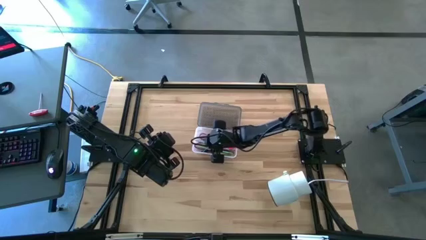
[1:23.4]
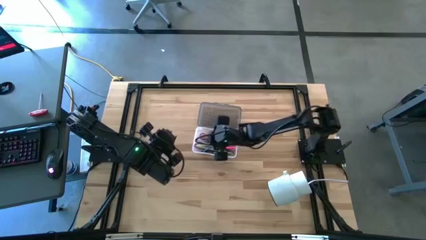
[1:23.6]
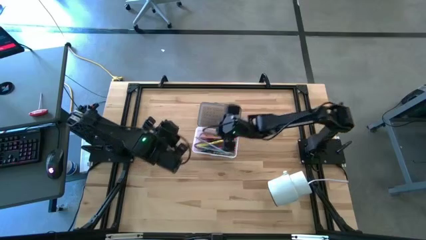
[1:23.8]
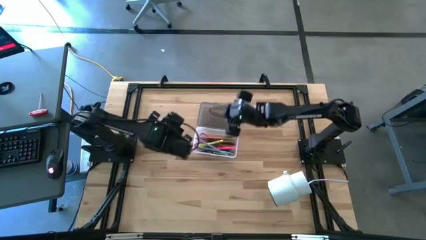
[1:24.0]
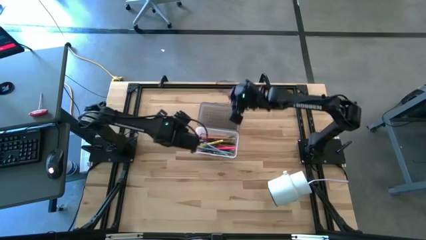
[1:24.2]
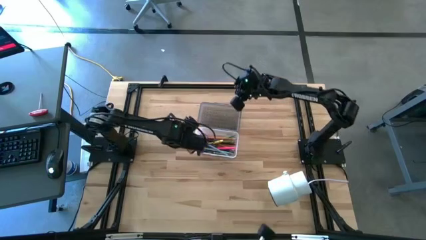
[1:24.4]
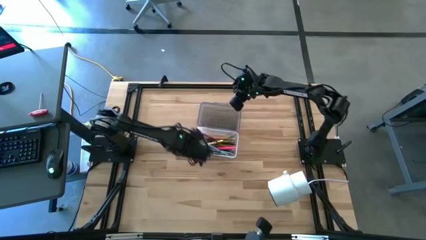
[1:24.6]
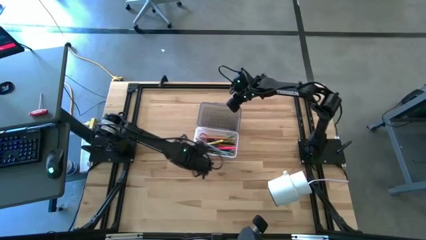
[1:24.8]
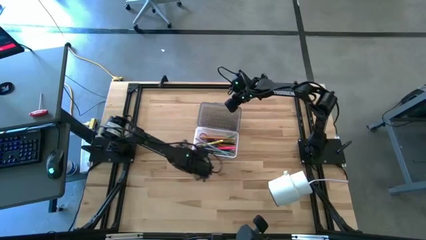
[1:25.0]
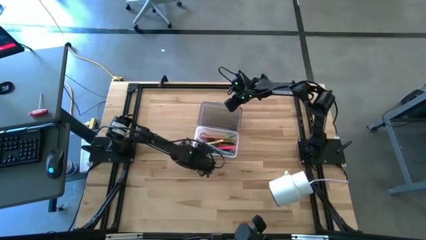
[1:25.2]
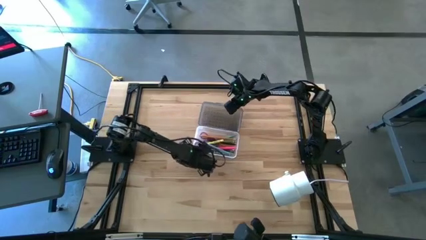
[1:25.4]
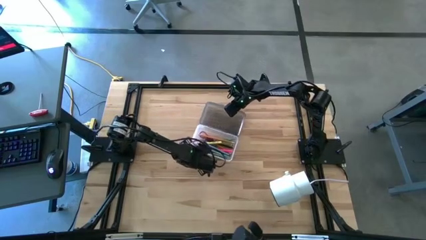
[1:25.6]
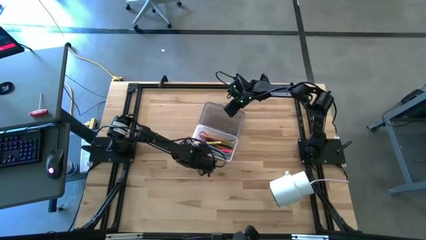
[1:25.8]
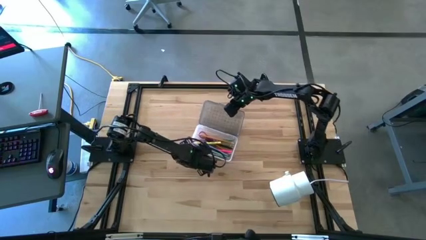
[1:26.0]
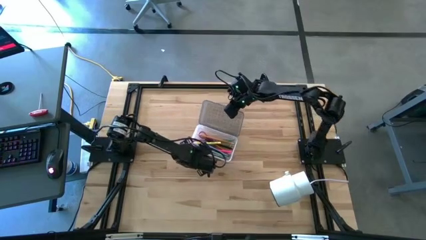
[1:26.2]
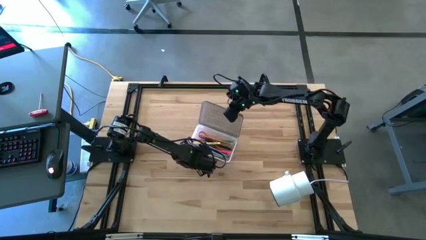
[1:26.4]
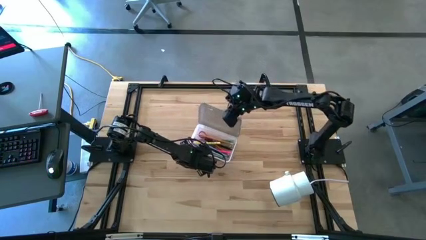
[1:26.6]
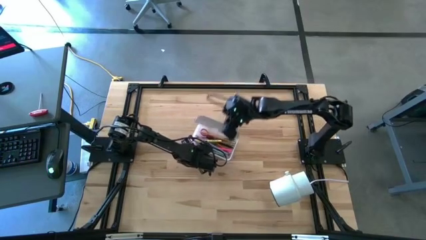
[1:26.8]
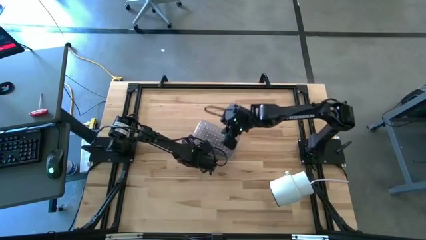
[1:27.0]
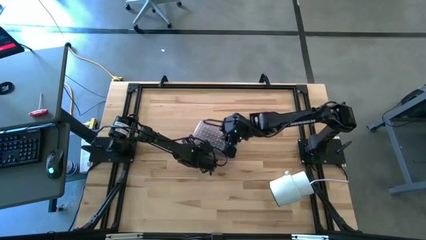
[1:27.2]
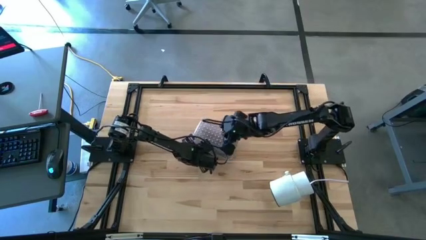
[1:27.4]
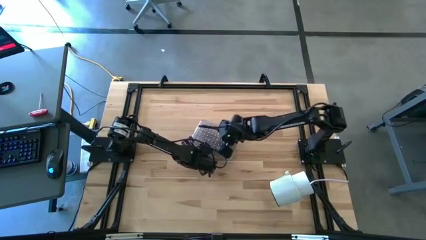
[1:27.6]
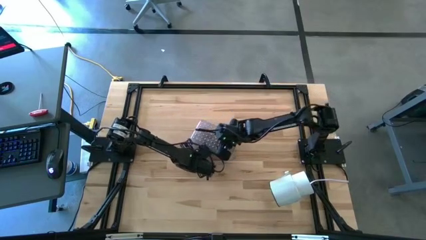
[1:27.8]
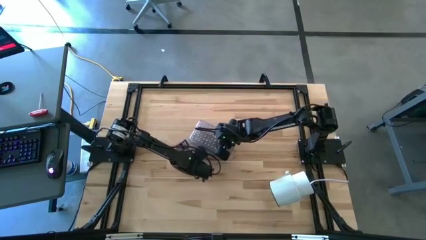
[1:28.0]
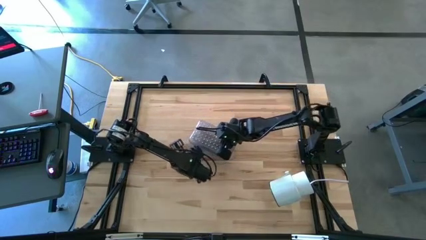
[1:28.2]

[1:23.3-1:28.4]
Task: Pick & place school supplies into a supply box
Close the lid of the black supply box

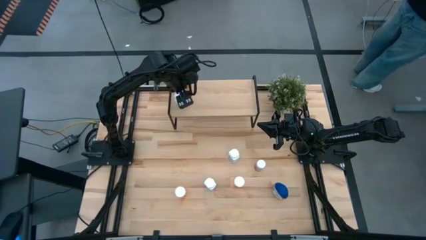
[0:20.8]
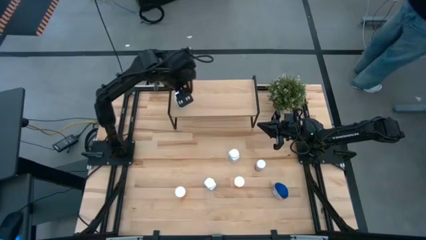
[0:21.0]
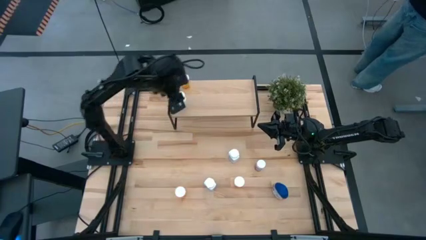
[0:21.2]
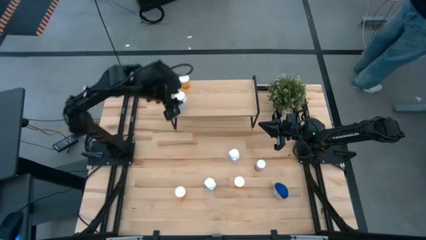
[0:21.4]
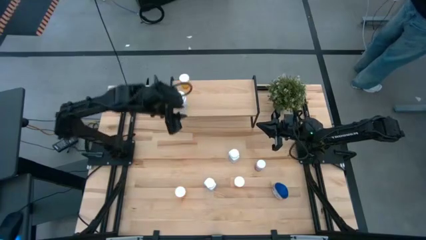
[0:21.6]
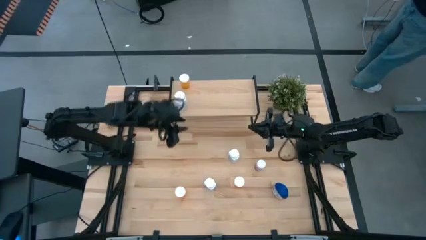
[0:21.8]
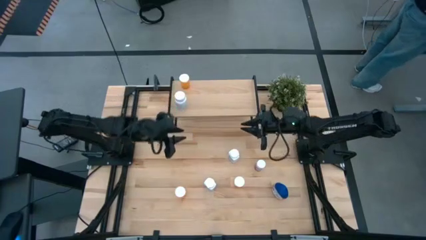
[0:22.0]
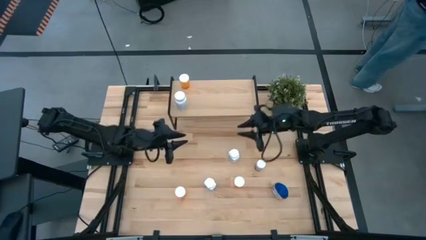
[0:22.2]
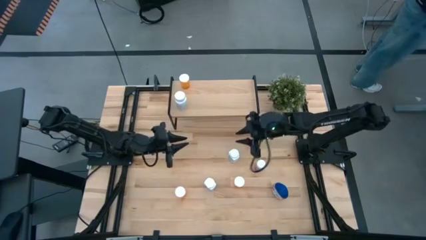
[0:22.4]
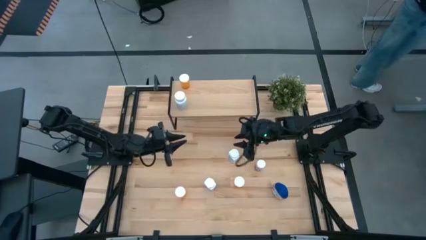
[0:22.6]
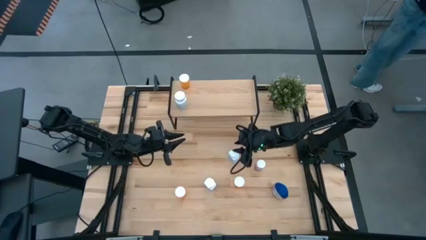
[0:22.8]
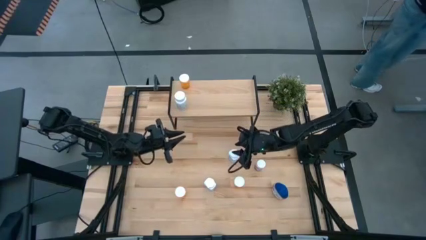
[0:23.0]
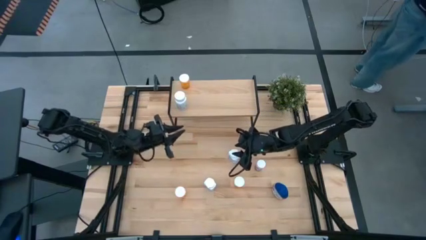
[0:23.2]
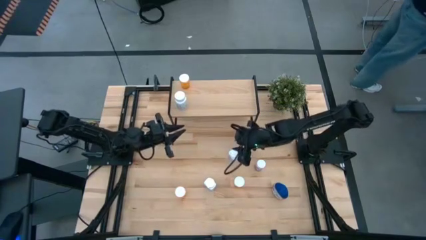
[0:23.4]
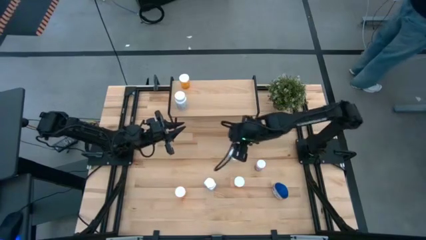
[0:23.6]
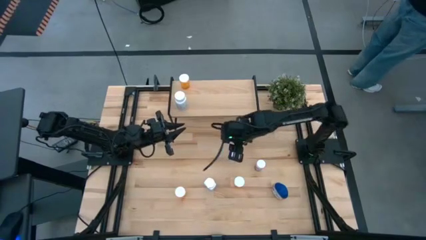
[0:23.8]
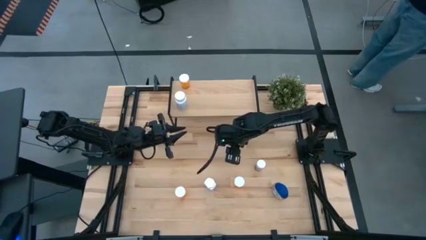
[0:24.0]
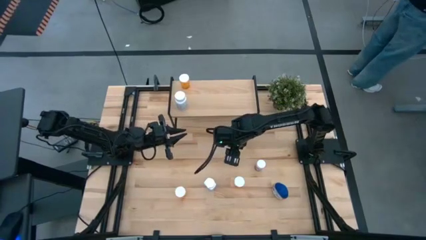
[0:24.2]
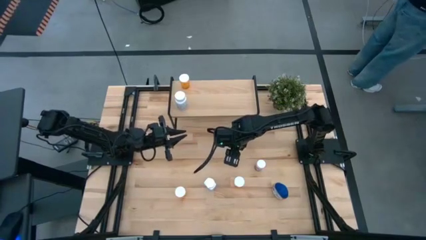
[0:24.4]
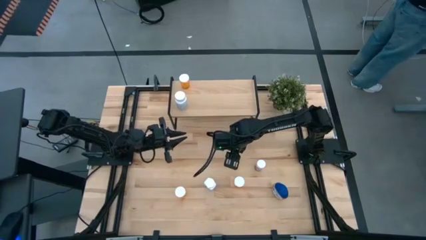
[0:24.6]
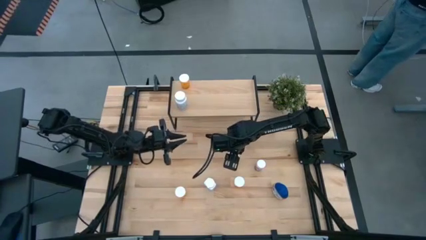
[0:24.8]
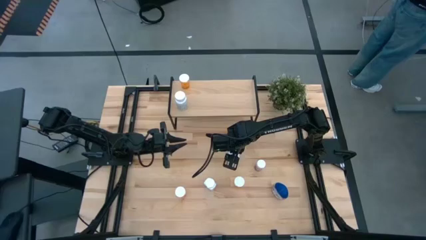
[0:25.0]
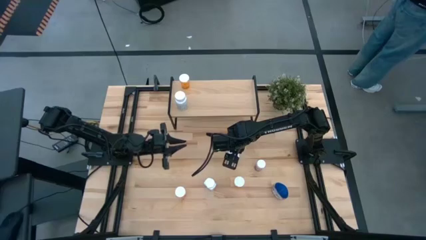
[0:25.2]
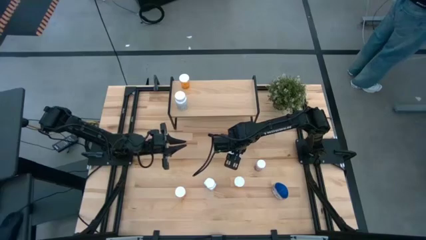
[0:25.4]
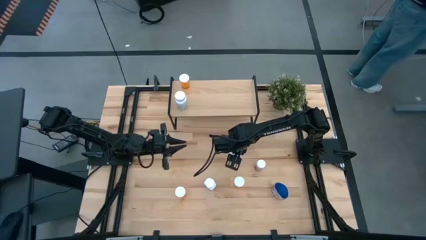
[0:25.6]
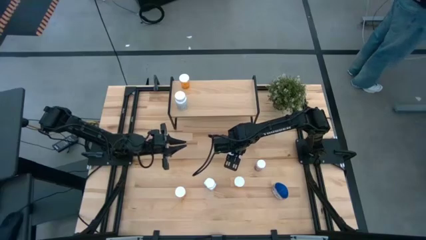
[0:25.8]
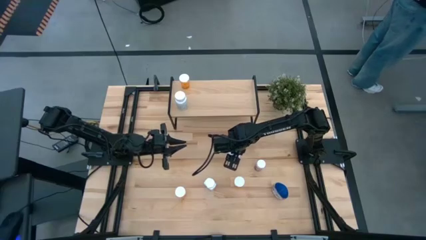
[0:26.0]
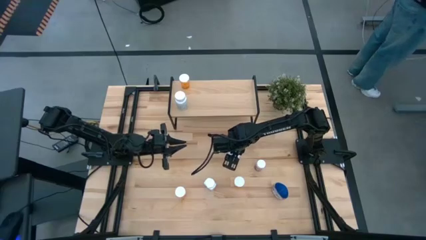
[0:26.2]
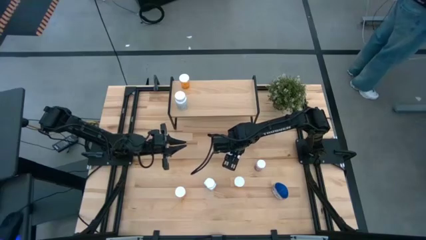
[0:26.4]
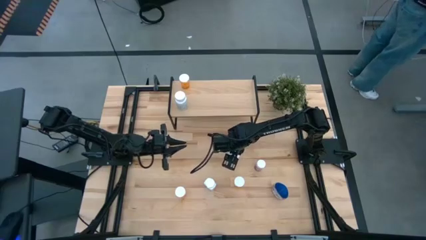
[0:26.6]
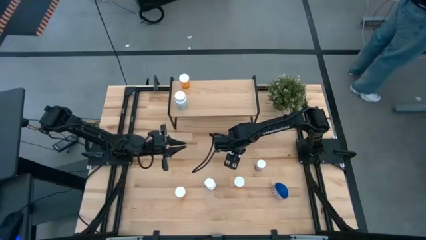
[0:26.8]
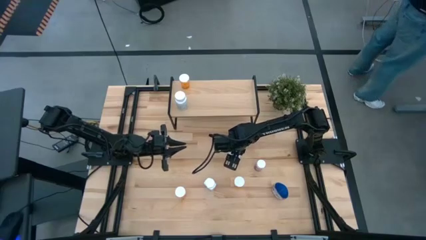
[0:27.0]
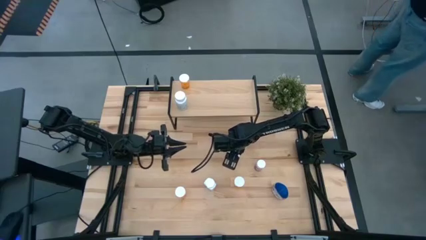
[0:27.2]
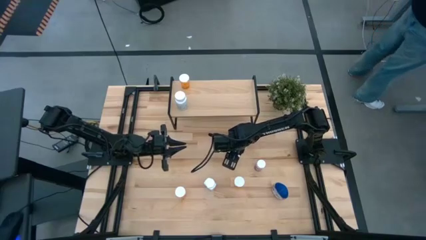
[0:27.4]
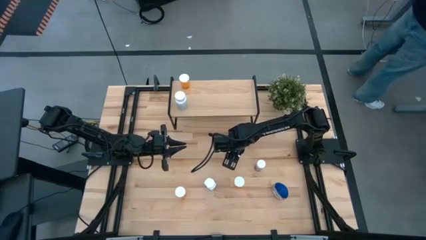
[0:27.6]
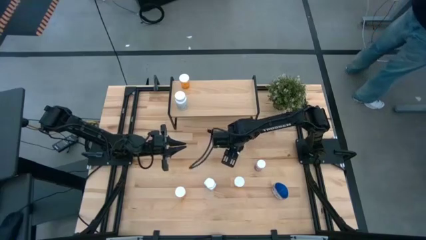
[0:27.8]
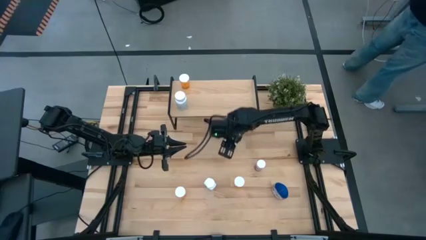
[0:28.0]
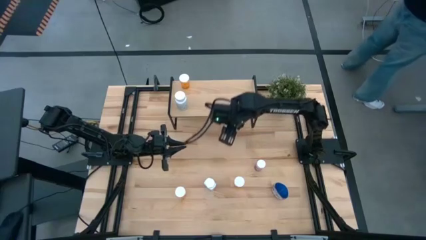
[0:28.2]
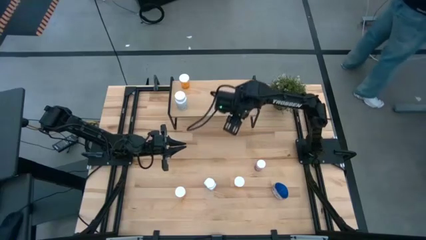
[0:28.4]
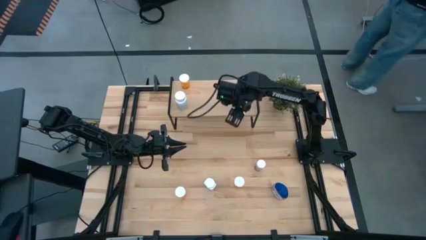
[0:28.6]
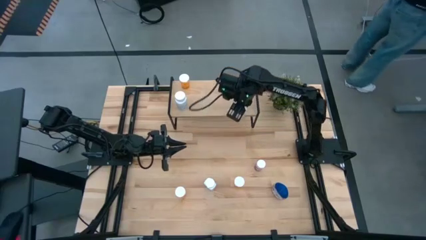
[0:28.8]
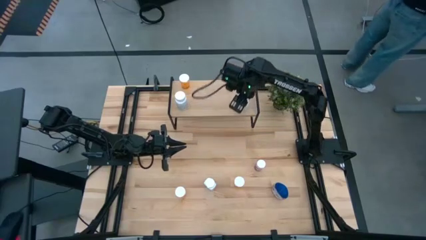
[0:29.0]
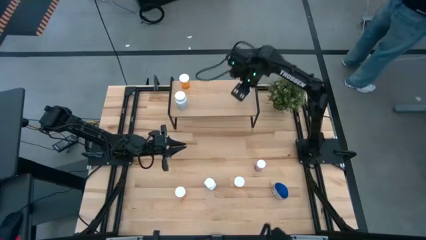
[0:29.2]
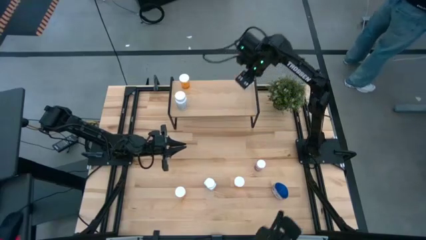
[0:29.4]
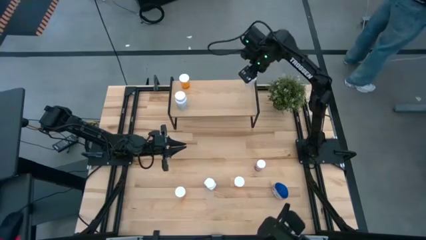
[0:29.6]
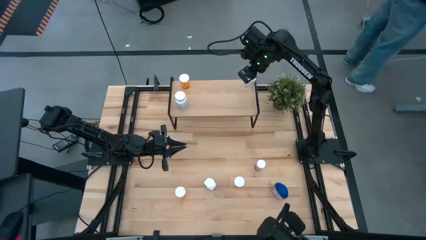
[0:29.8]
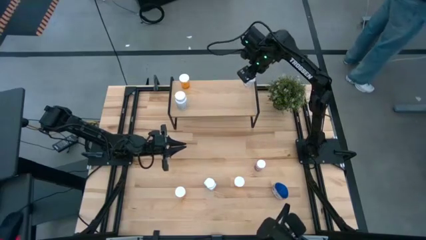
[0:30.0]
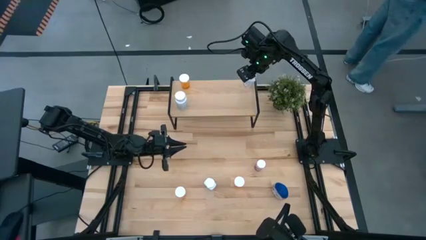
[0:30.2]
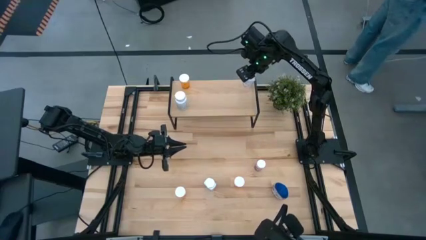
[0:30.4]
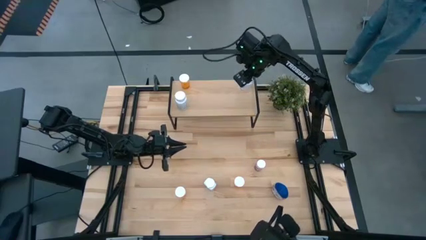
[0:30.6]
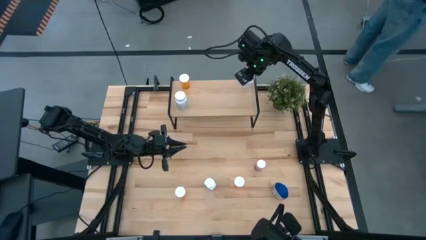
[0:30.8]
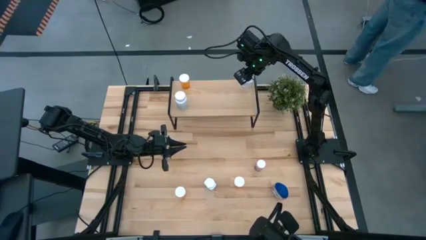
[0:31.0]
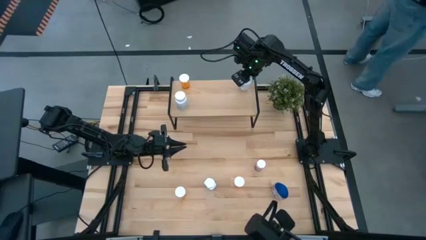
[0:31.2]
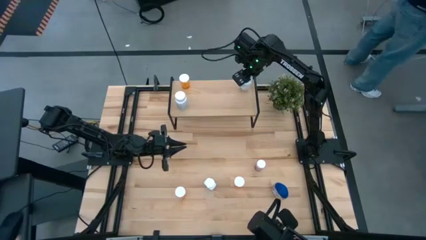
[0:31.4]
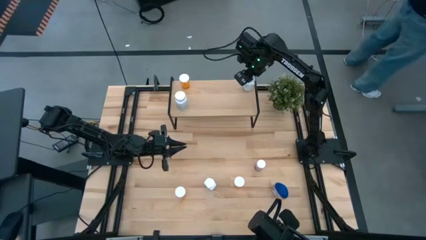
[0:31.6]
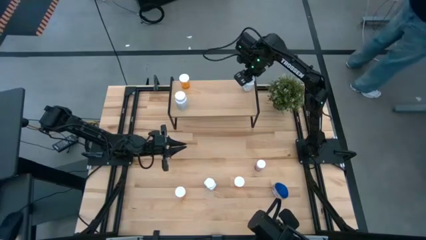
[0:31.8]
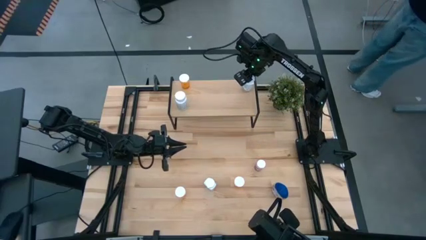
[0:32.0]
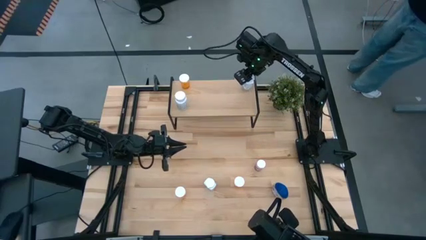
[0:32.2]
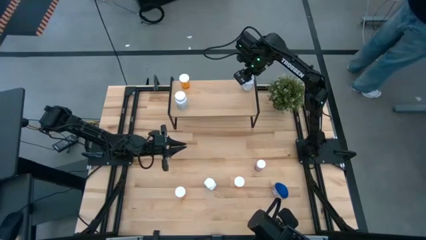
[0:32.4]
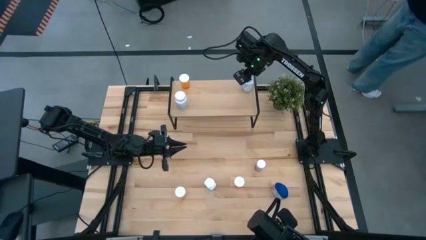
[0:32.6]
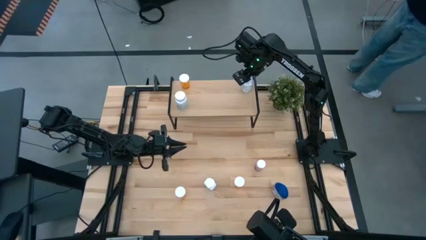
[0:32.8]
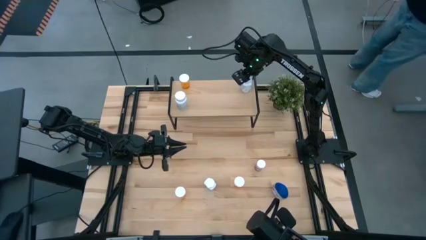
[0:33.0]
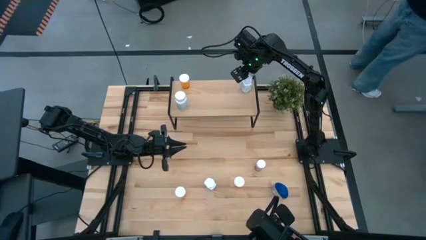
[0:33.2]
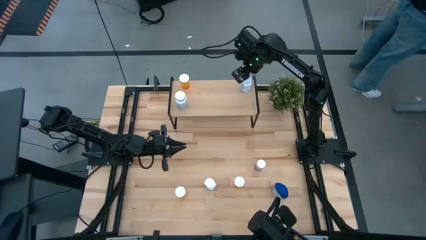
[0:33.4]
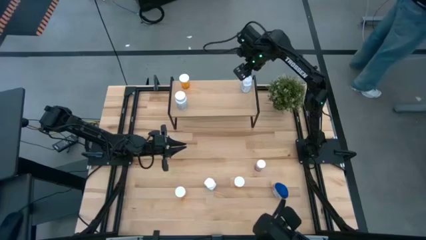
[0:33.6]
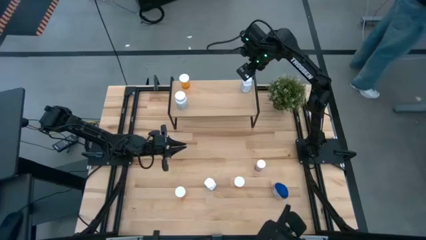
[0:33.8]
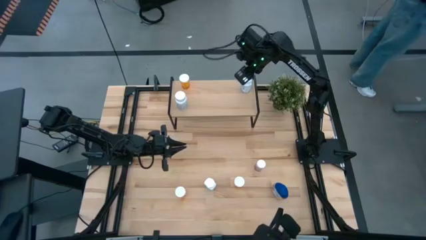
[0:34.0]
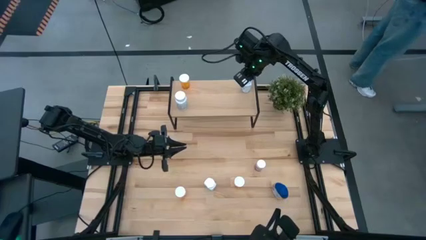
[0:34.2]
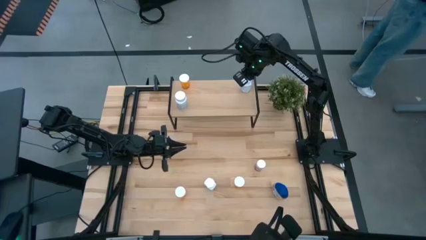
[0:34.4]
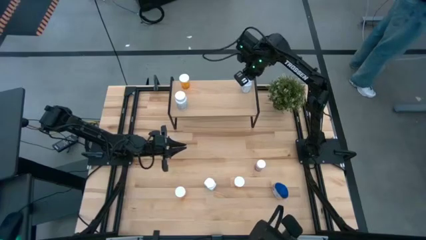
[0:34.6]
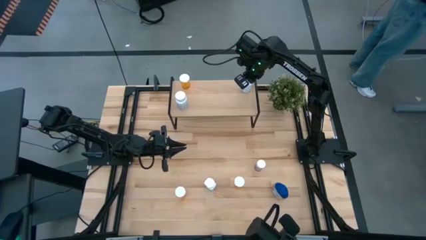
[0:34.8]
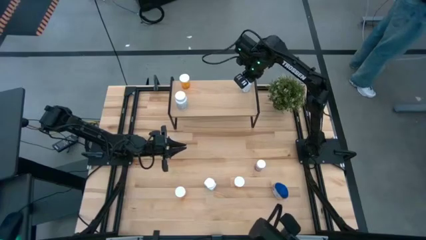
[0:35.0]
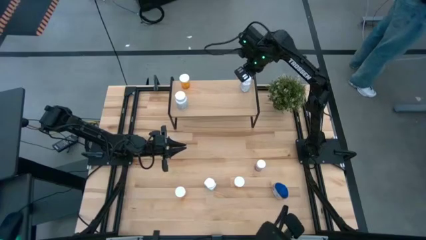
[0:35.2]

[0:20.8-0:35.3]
Task: Pick and place medicine bottles onto shelf by color
Put the top white pill bottle on the shelf
